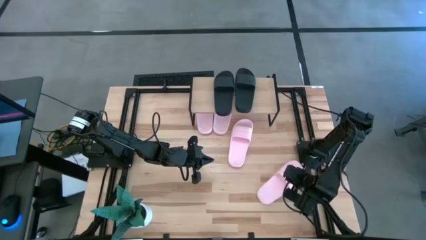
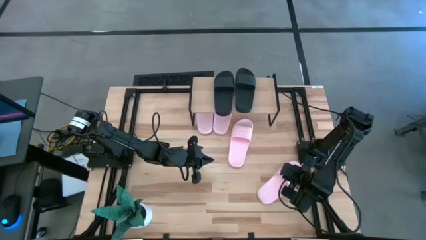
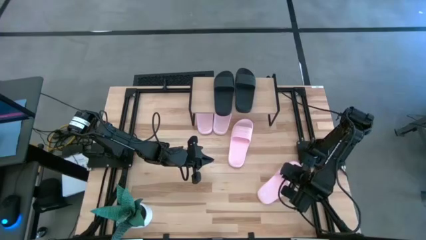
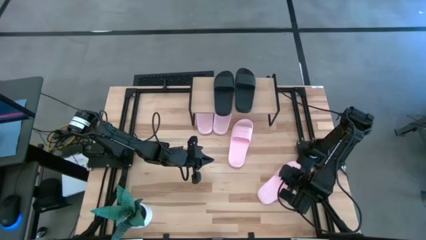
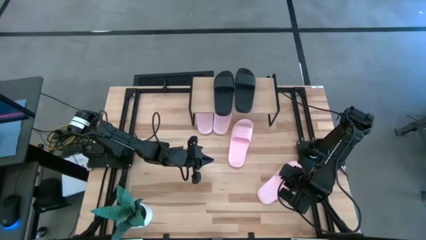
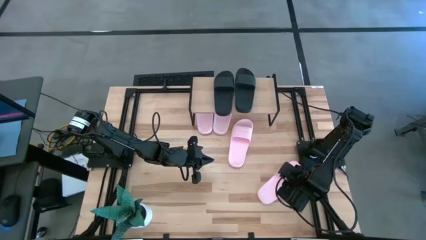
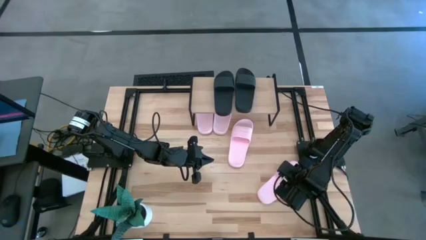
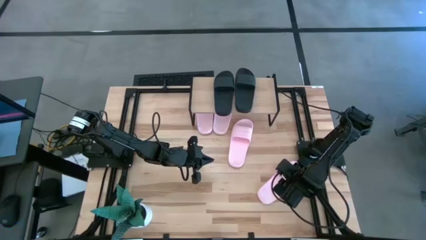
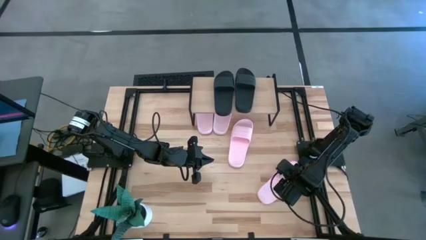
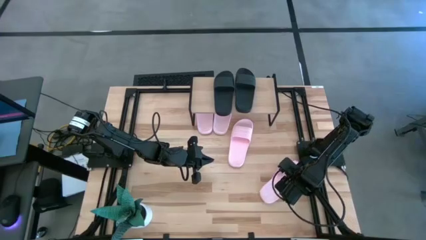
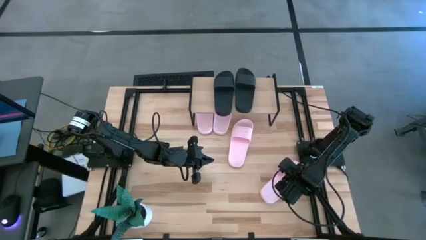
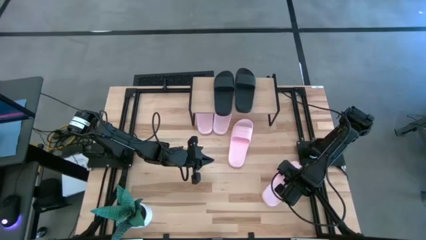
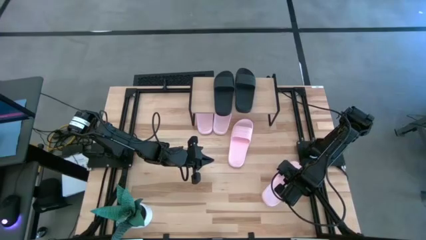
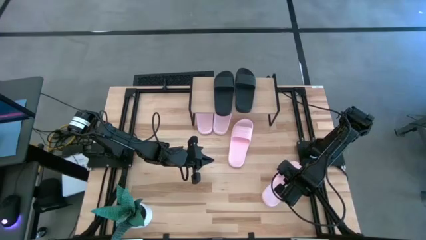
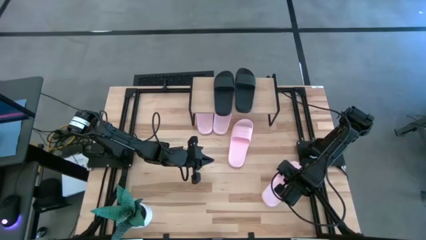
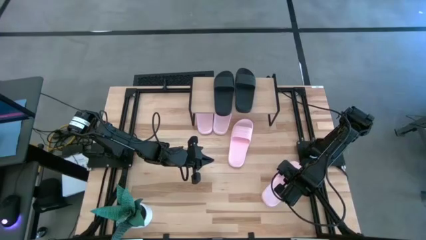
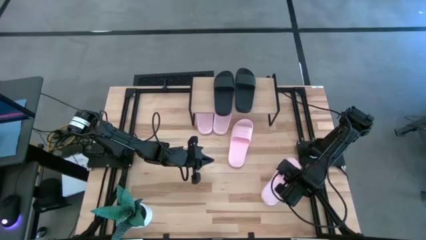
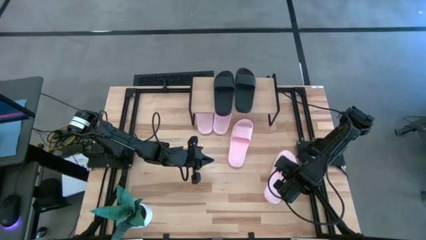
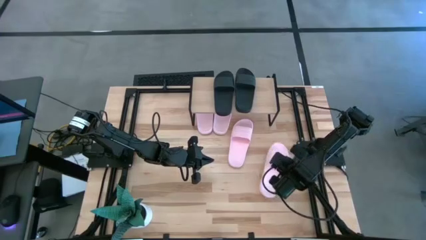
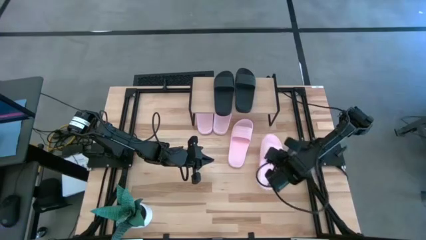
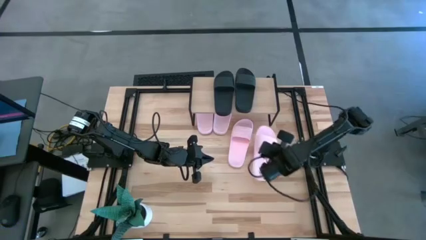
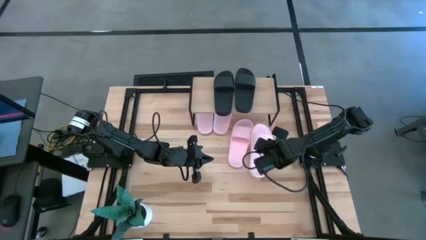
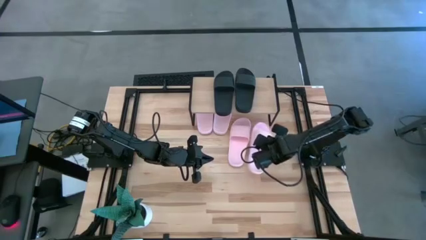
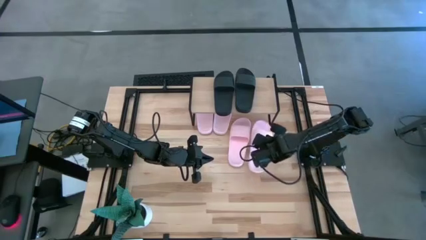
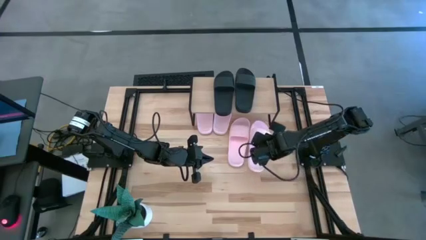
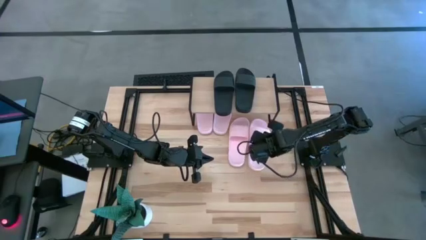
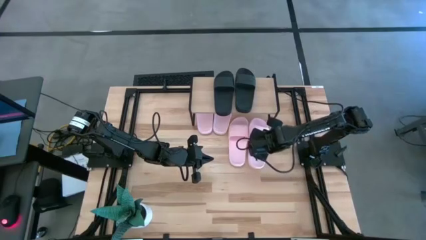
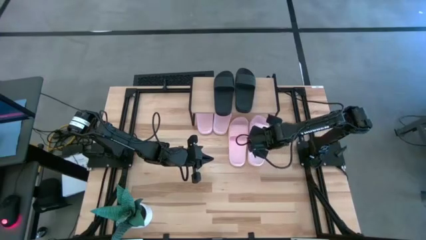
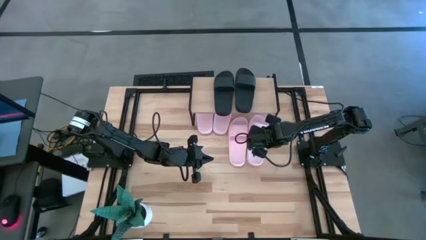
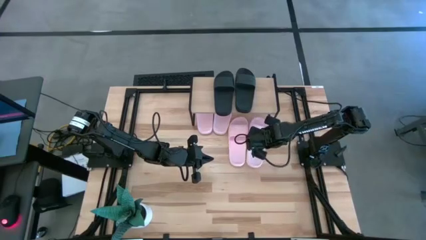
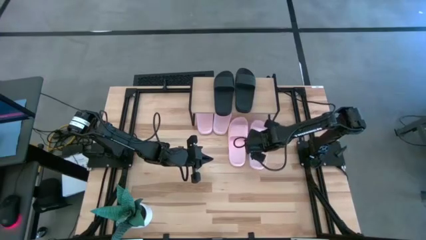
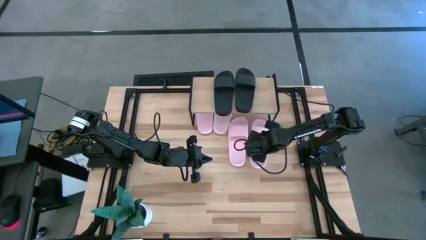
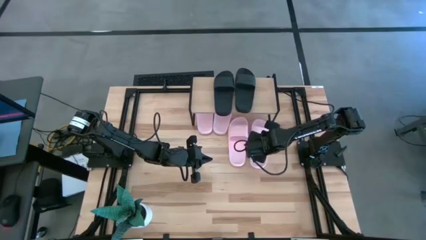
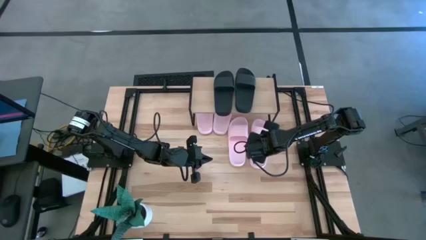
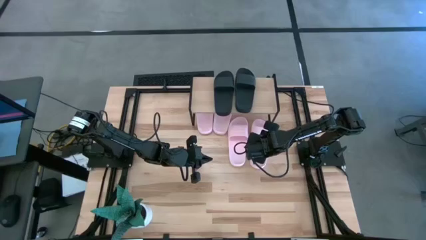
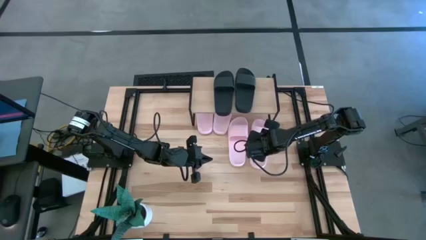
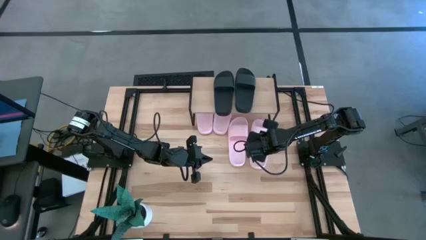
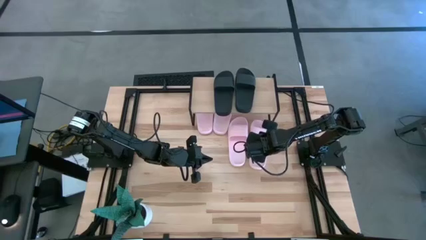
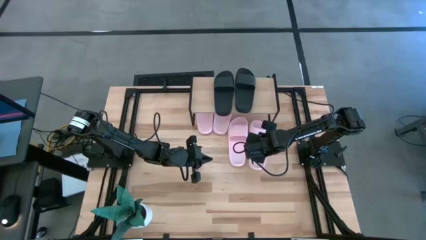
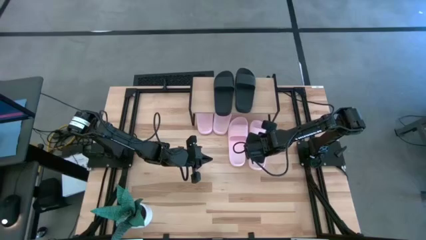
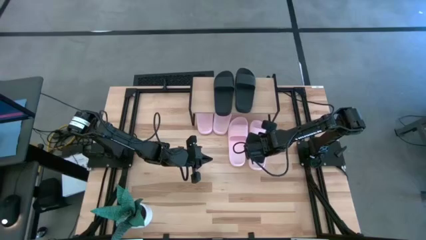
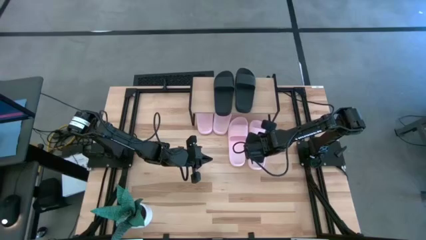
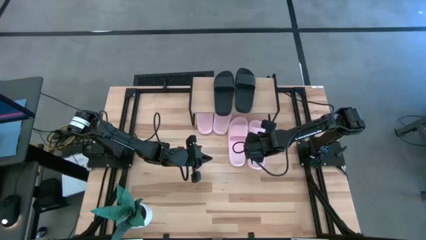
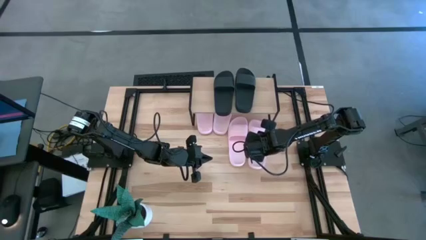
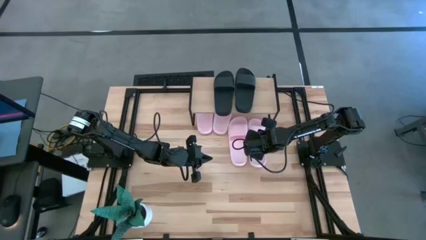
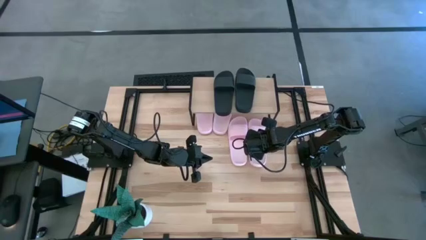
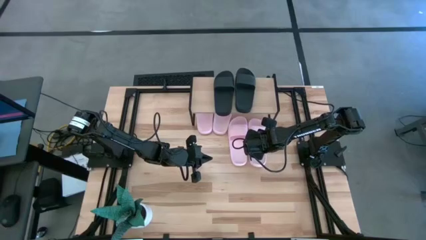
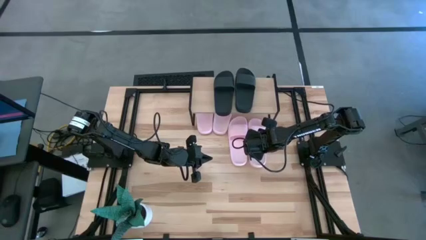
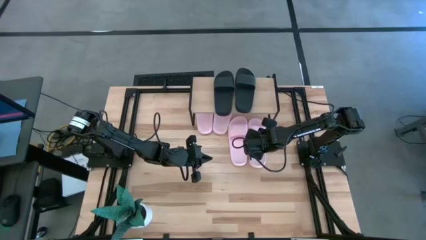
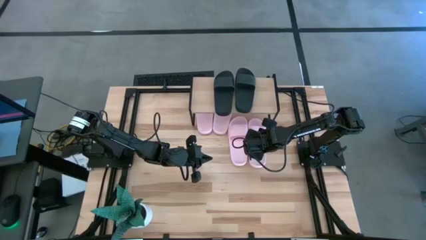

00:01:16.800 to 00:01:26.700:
Task: Pick and place slides into the shelf
Put the pink slipper under the shelf

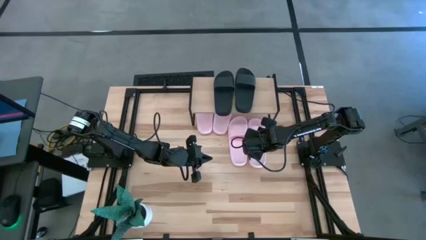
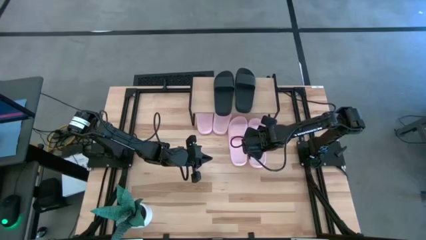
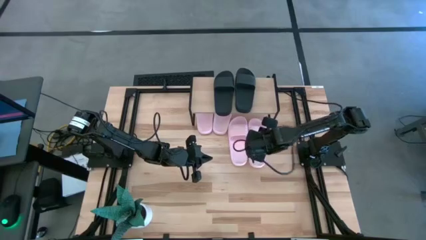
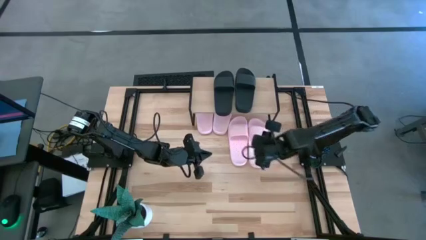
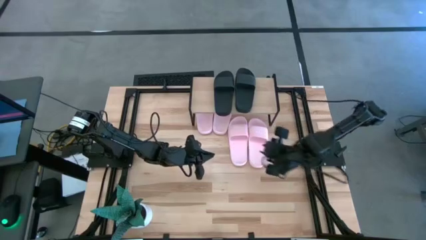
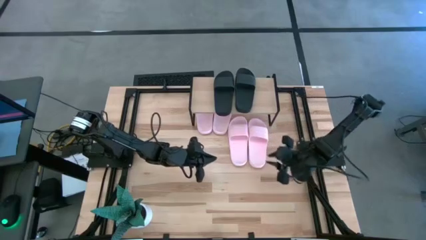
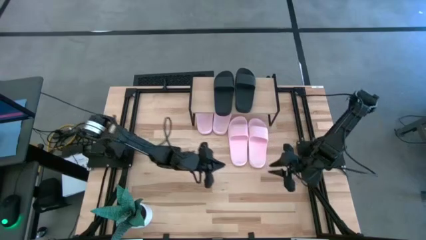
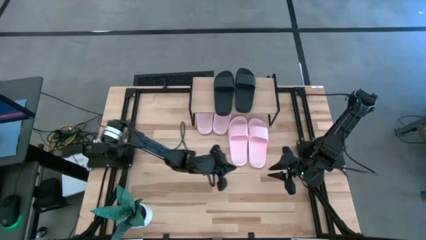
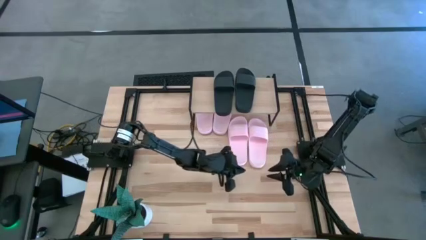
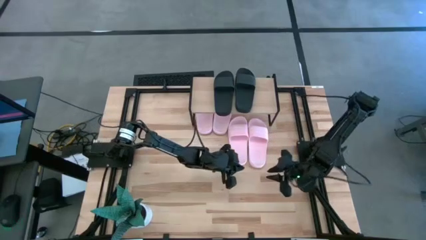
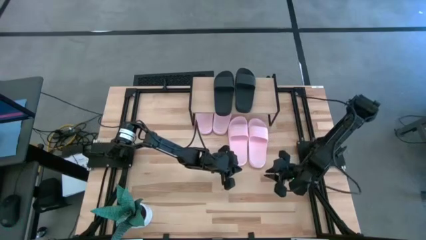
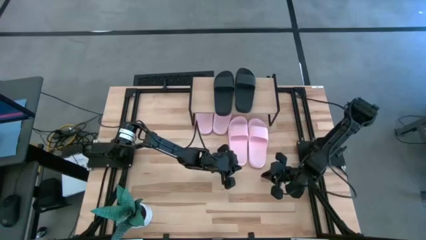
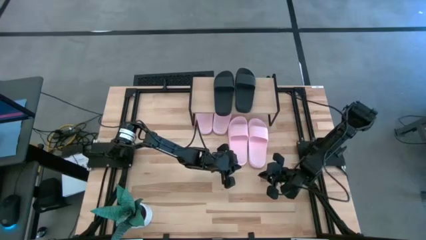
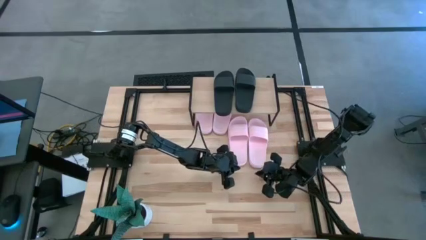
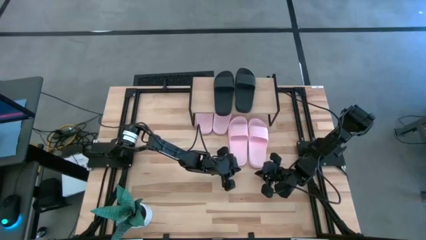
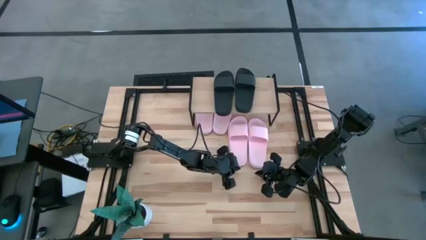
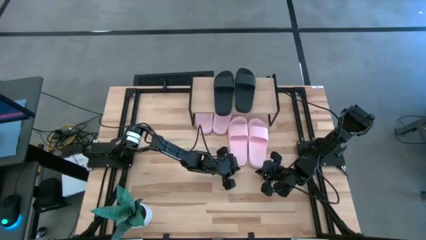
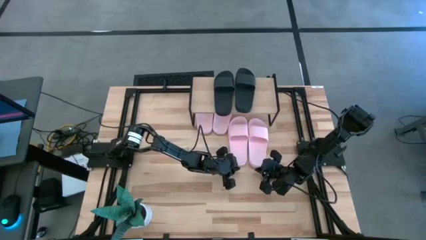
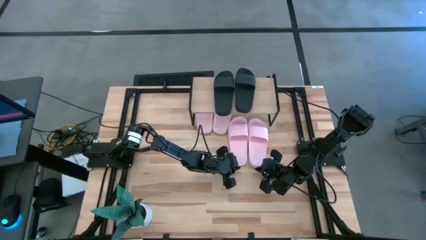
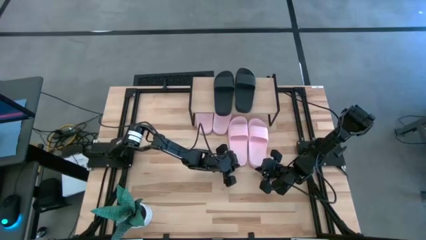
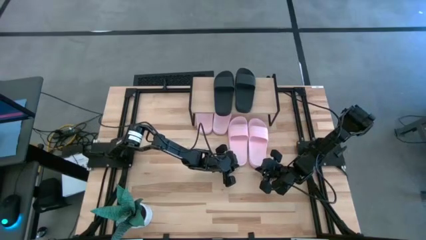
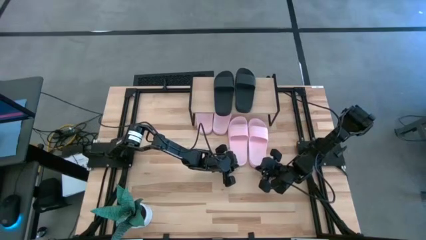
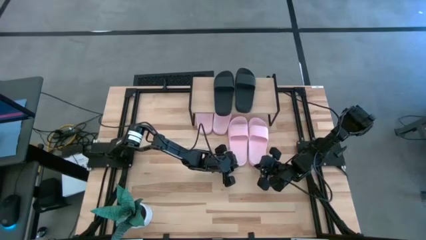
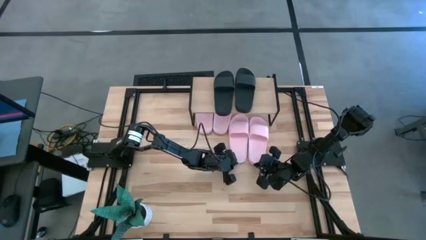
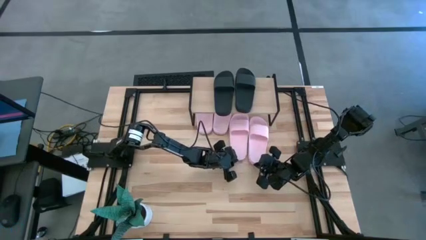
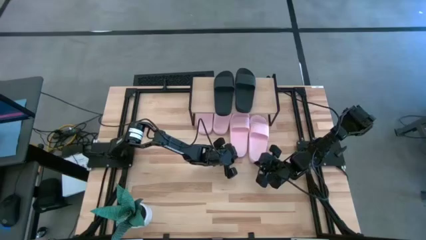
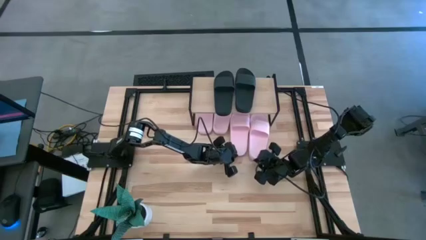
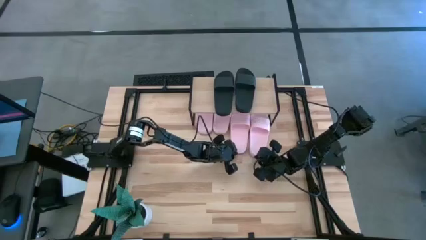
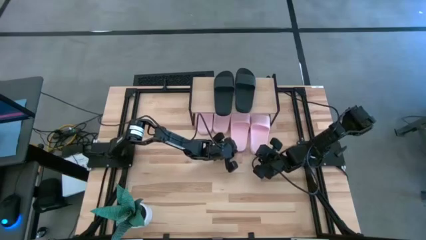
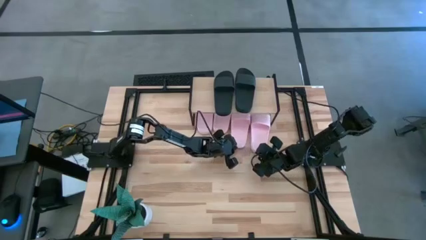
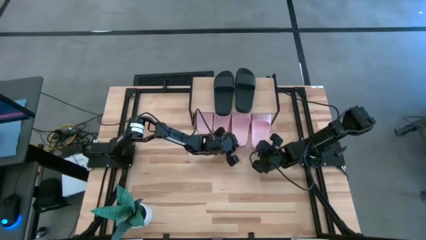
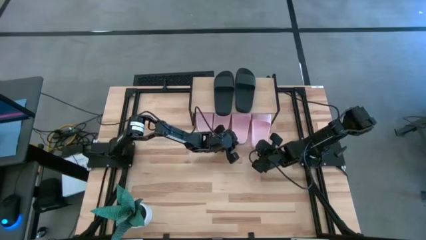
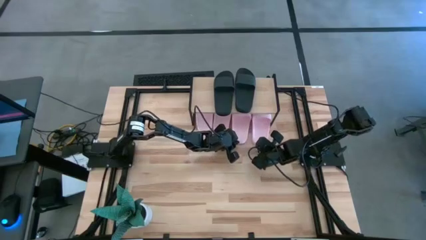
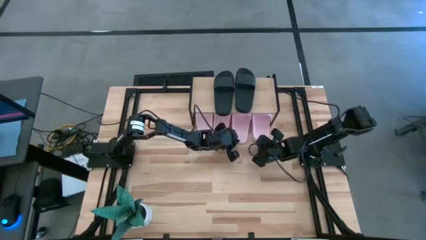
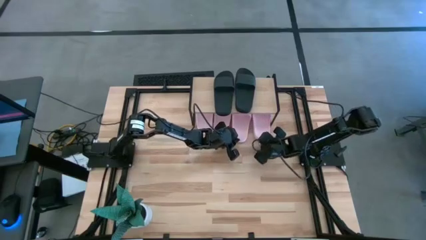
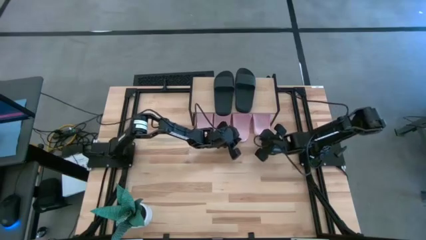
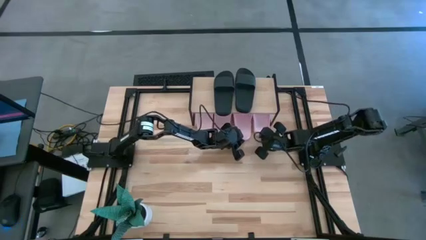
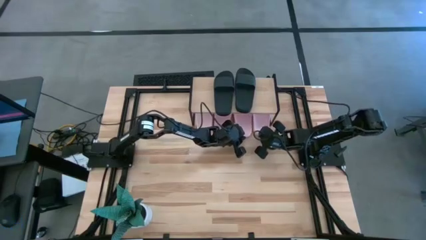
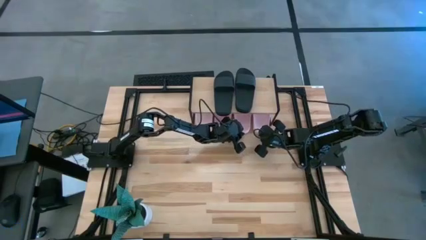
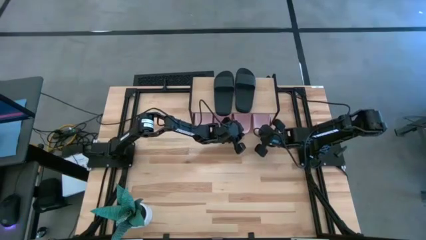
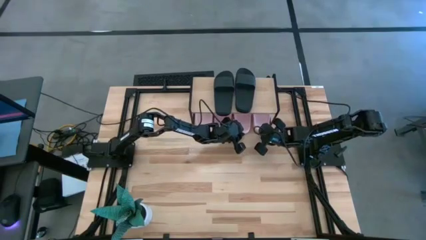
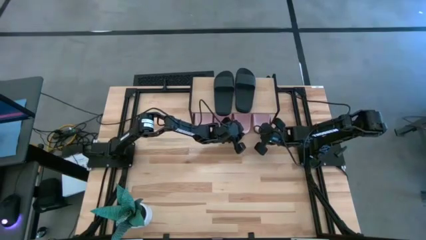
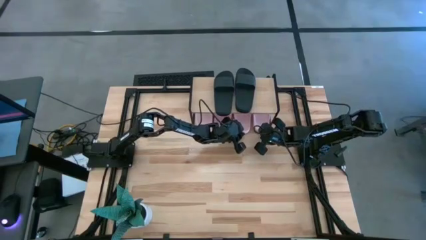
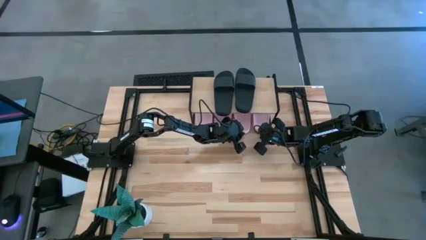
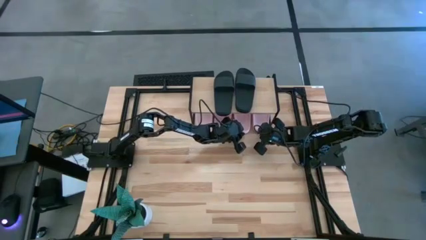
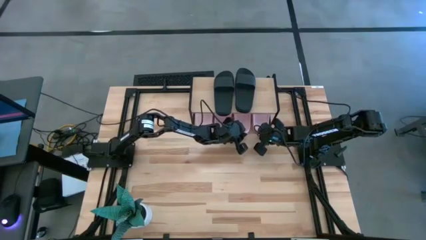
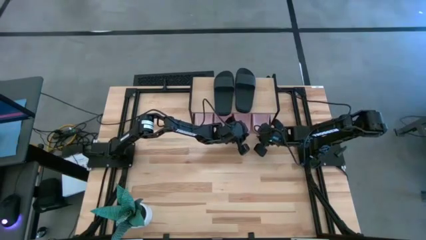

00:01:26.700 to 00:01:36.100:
Adjust the pink slippers under the shelf
